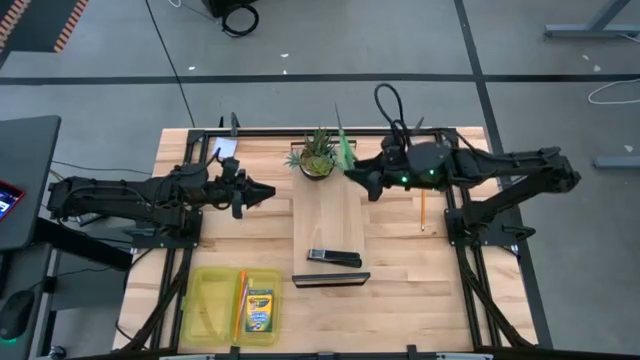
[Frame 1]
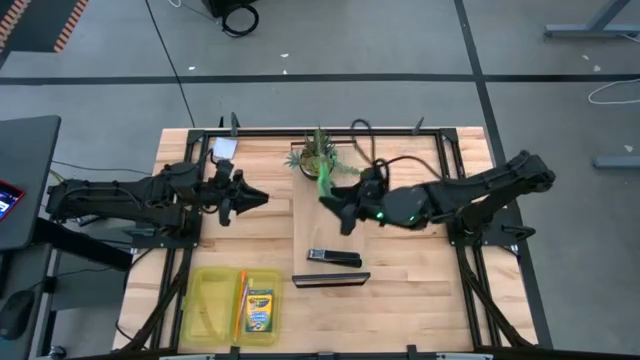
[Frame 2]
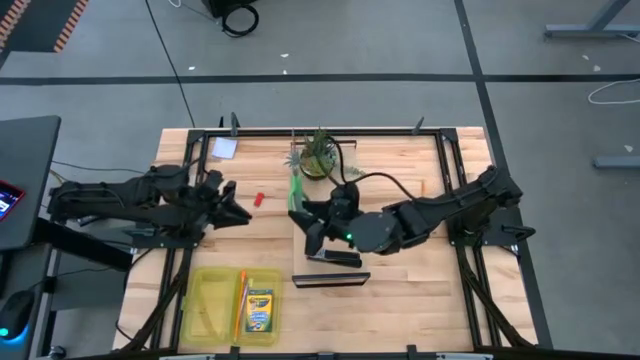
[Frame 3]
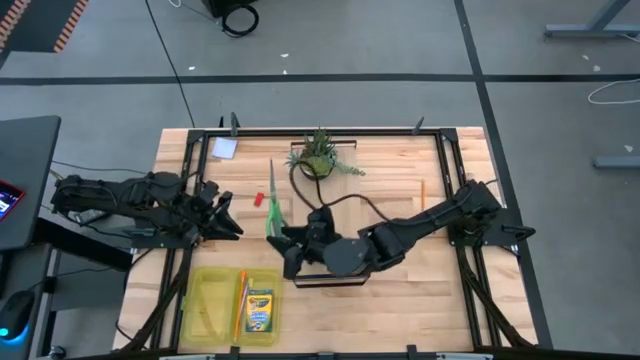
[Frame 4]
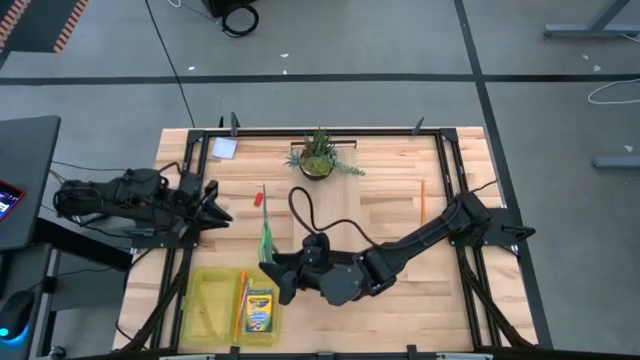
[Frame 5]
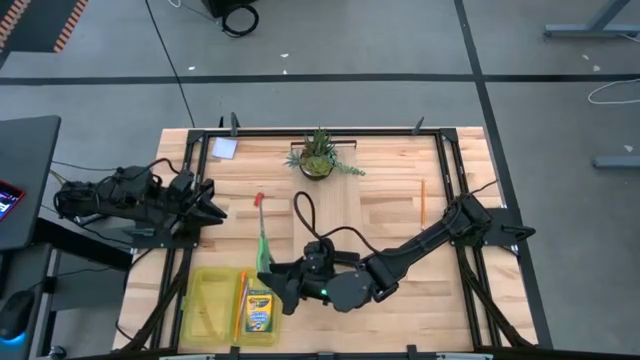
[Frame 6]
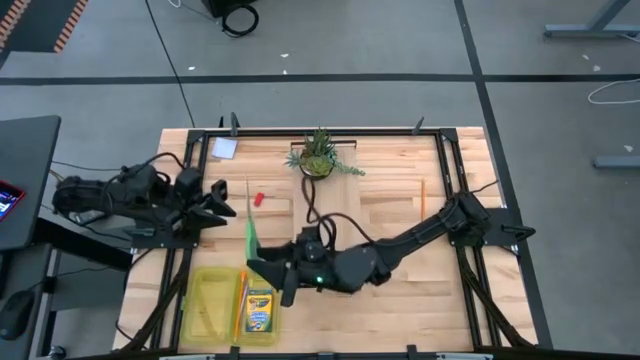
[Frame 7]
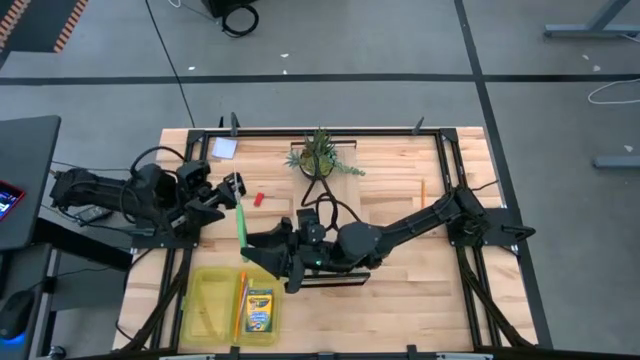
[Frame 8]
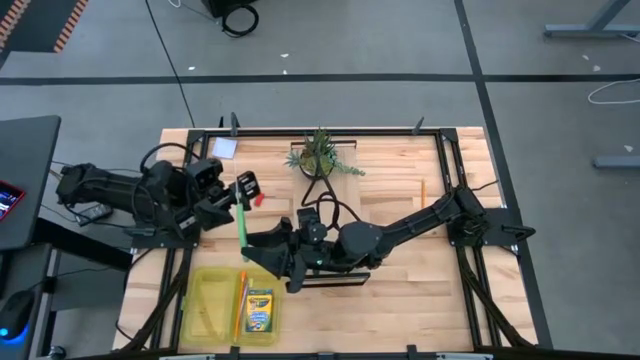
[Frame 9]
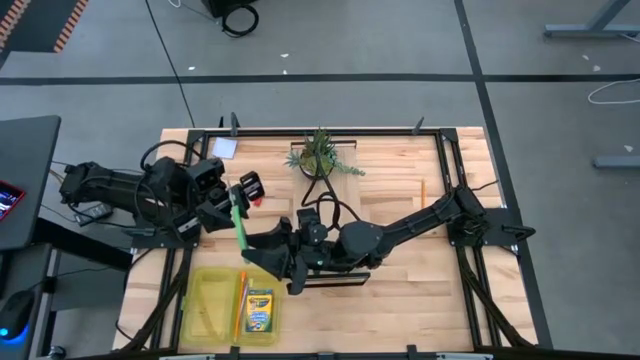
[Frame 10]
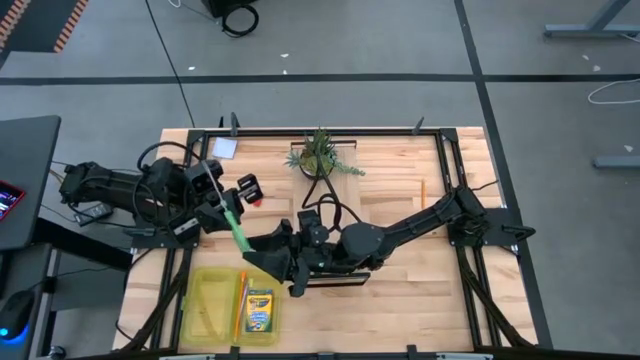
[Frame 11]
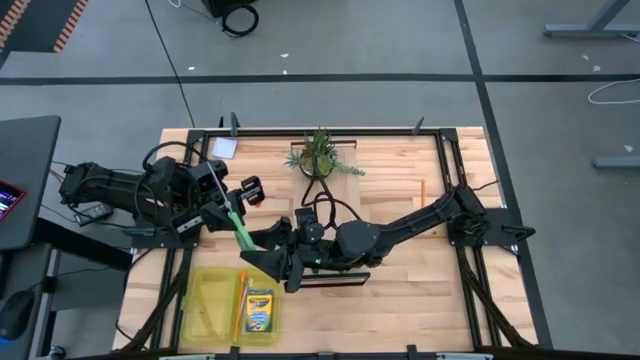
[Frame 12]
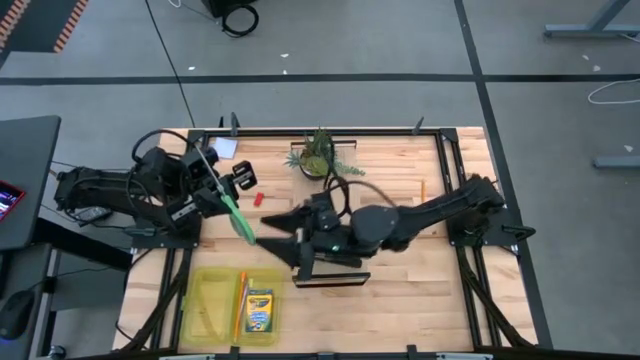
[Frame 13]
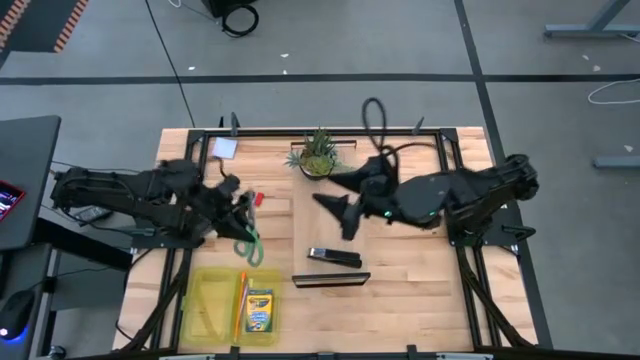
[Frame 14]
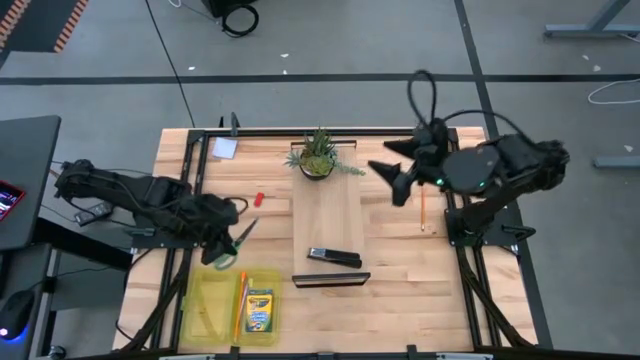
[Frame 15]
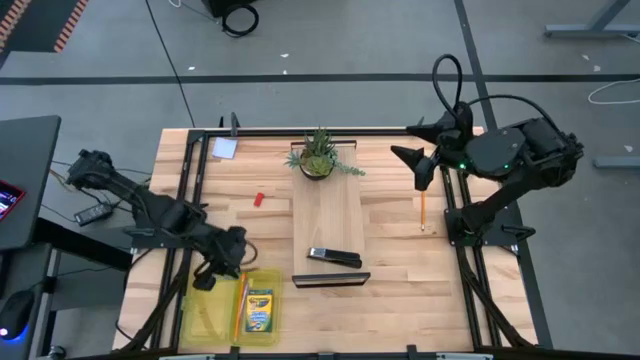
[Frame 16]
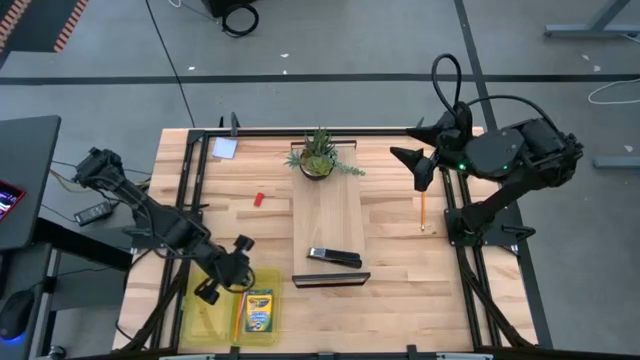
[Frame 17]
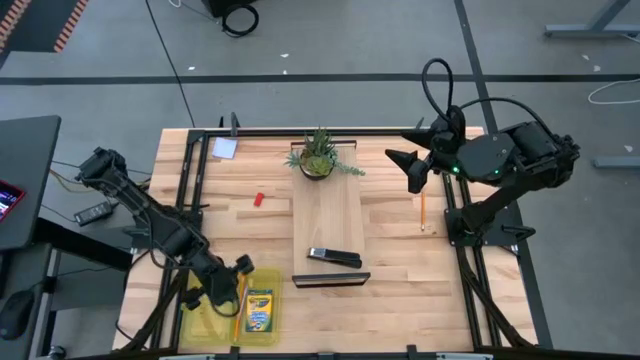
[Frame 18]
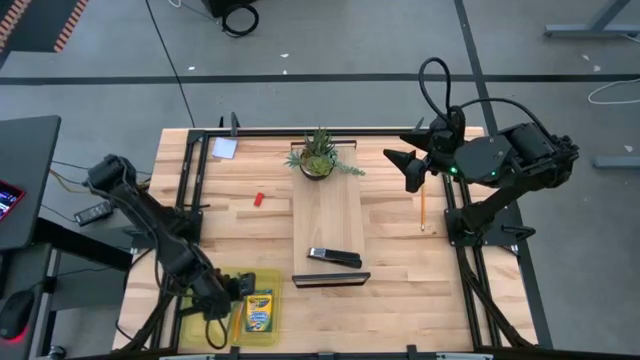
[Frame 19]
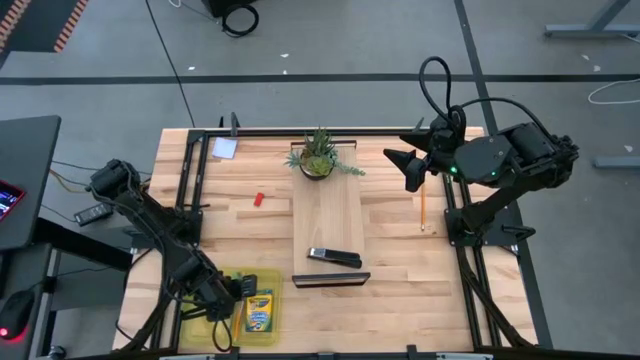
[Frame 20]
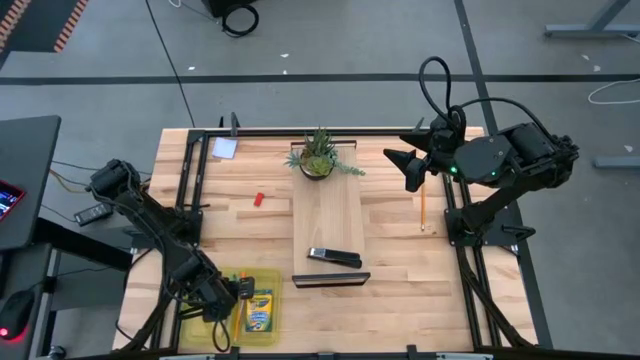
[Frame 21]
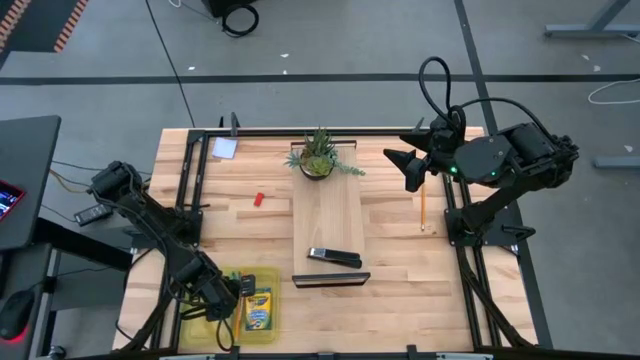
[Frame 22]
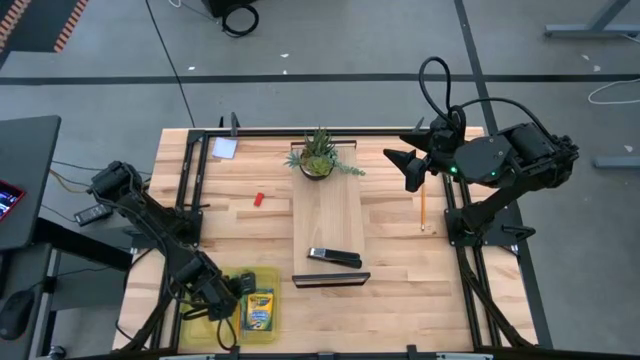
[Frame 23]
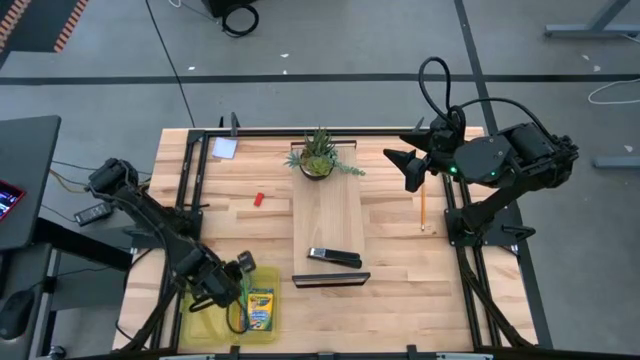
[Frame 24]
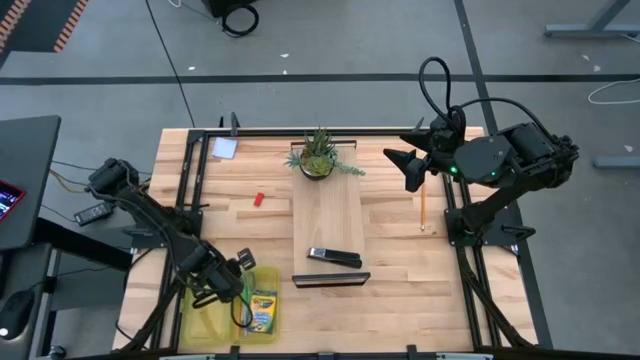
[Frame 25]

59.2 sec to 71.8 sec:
Task: Pack school essentials
Put the green scissors into the yellow supply box

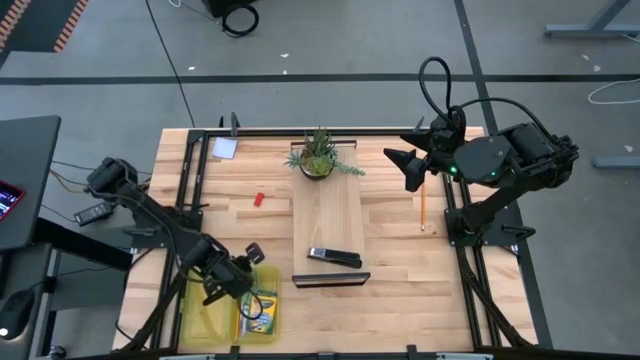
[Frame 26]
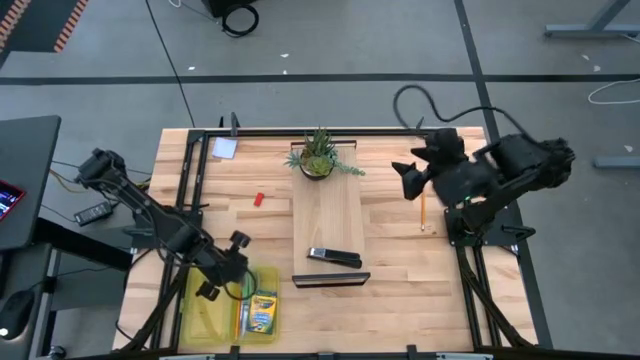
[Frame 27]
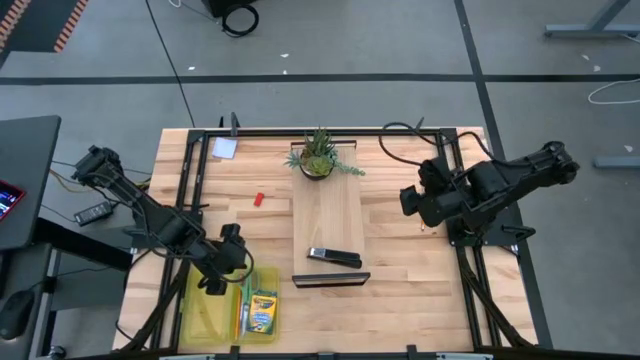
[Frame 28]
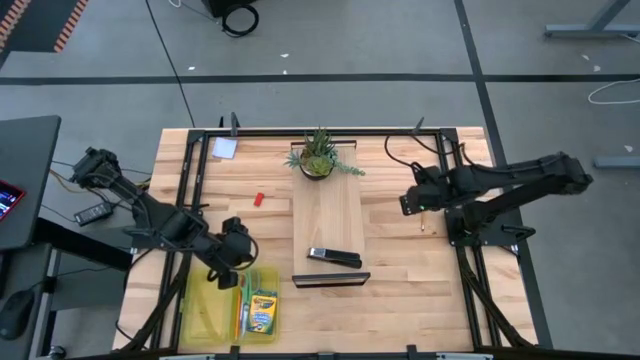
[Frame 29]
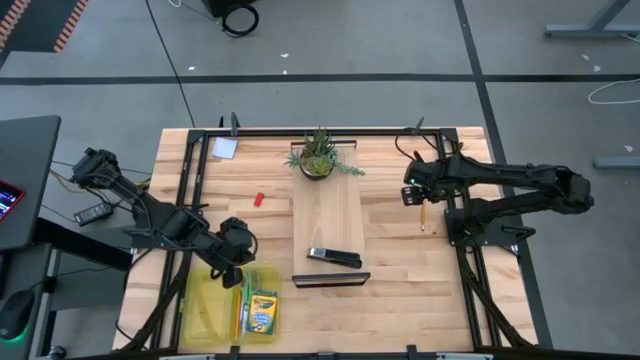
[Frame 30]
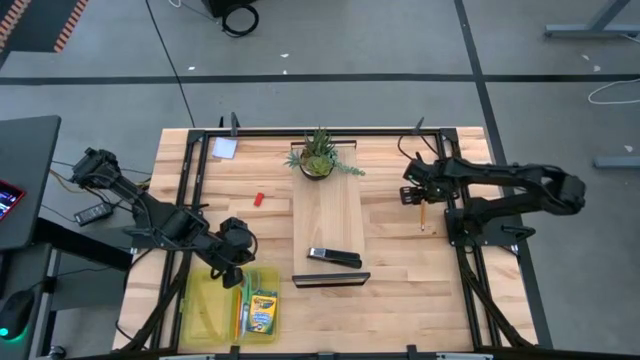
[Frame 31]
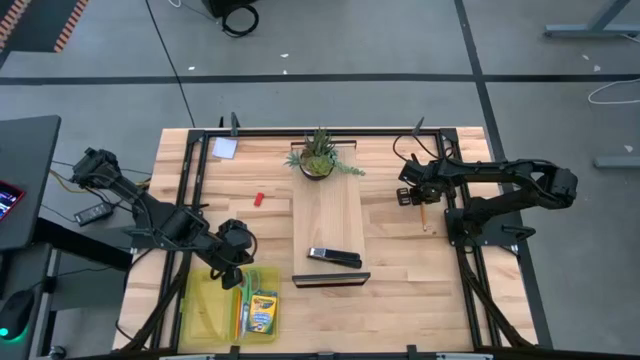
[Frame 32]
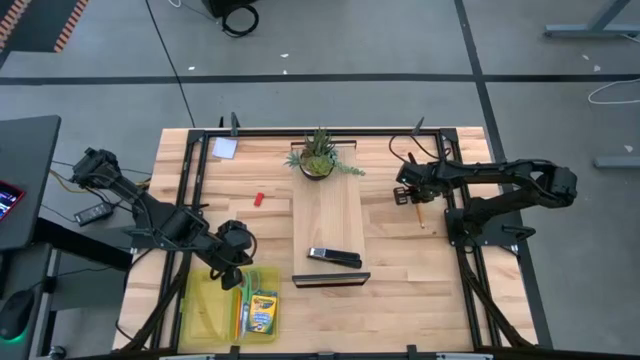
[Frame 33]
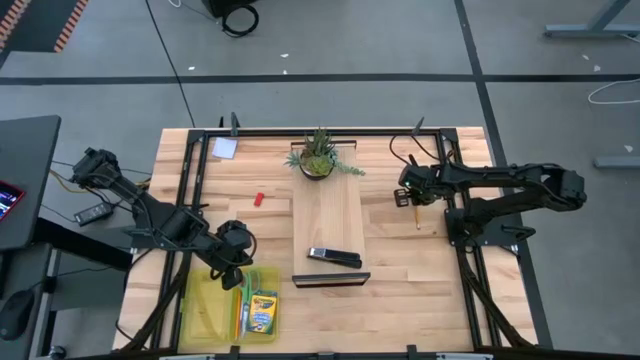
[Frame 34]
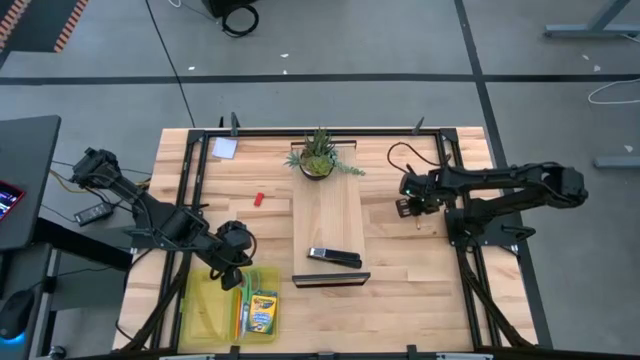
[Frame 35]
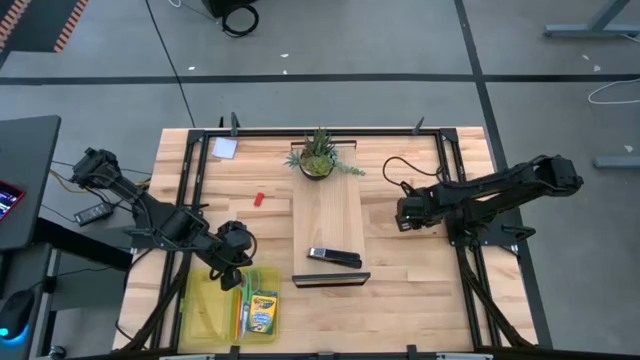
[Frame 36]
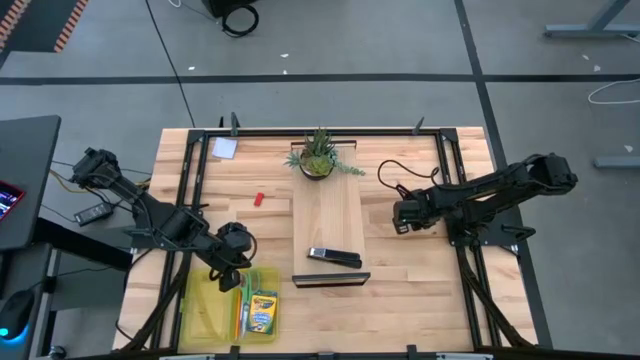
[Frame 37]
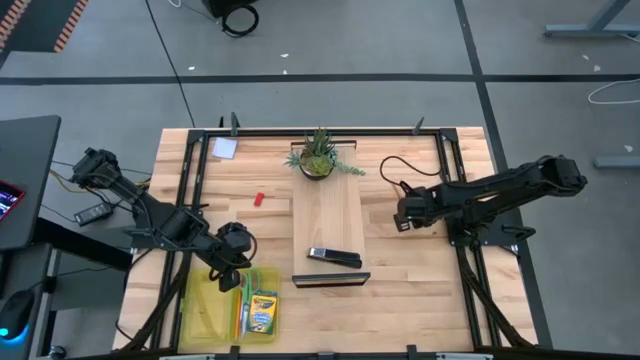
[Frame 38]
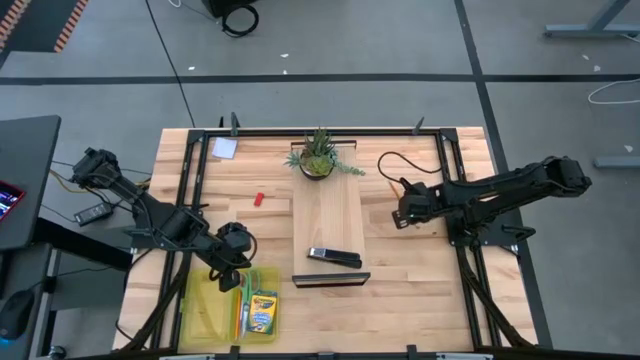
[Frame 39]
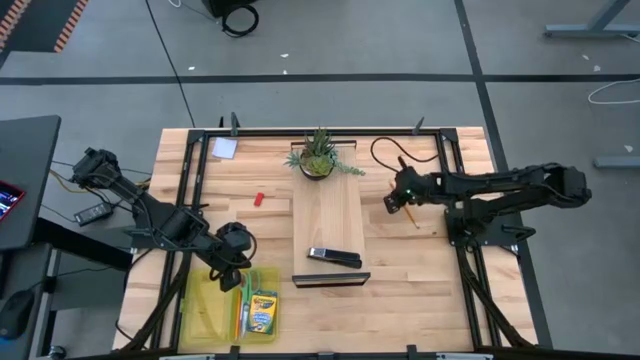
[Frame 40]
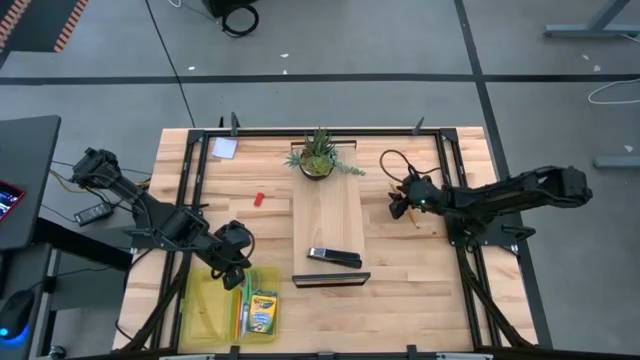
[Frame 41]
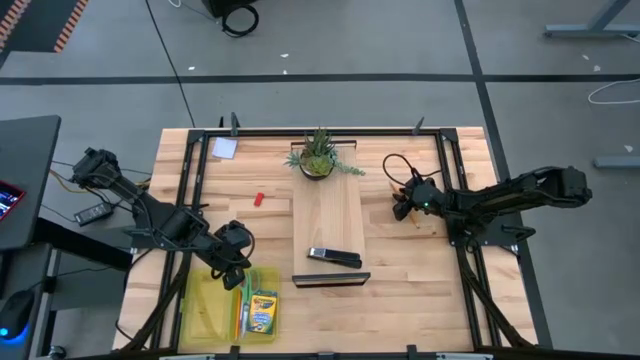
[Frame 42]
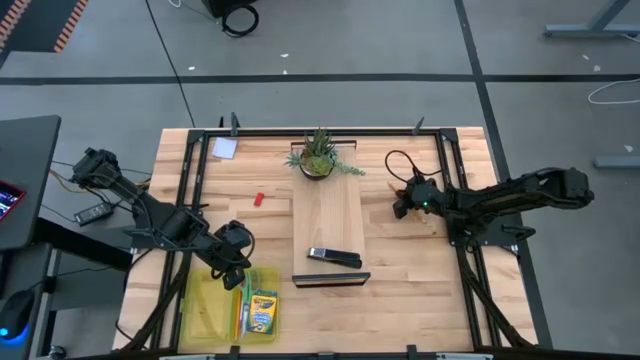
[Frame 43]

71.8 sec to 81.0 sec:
Put the orange pencil into the yellow supply box
